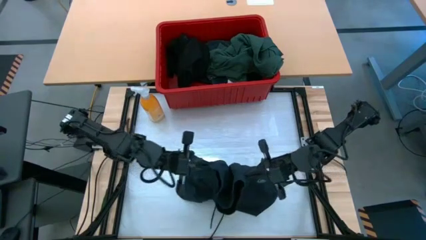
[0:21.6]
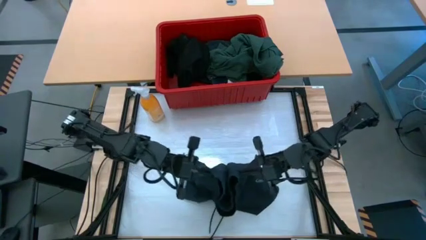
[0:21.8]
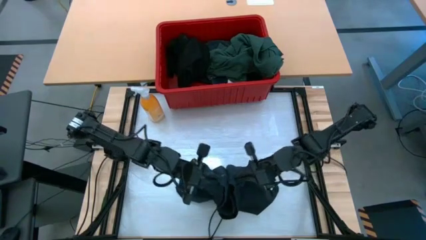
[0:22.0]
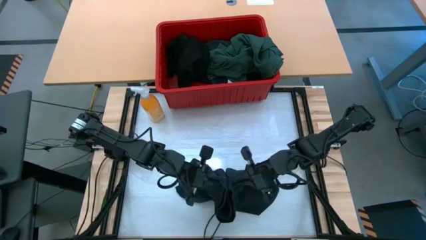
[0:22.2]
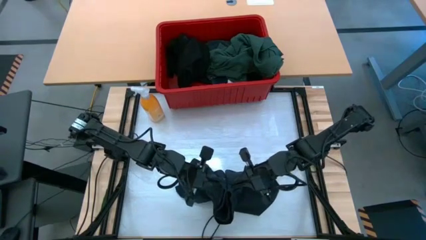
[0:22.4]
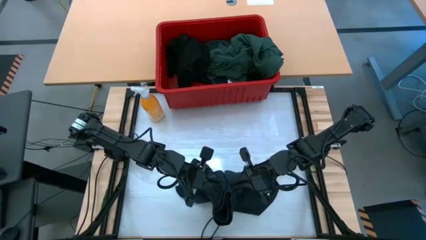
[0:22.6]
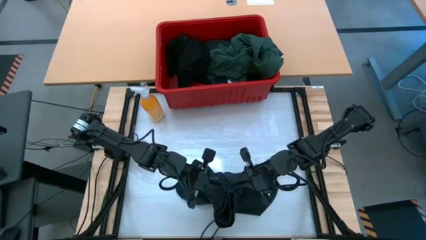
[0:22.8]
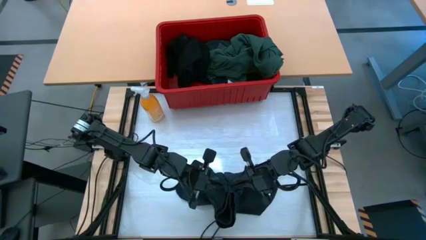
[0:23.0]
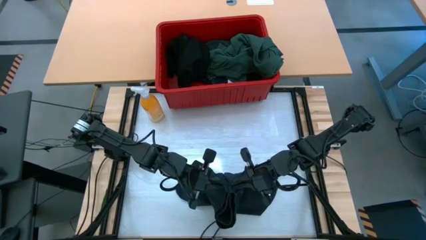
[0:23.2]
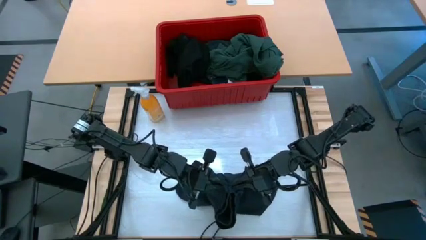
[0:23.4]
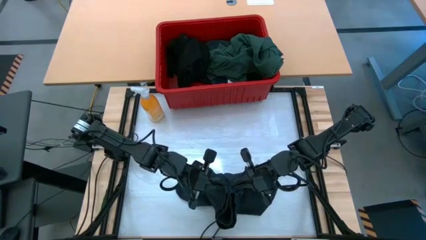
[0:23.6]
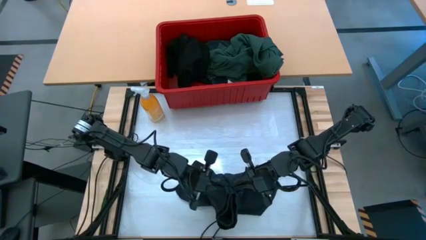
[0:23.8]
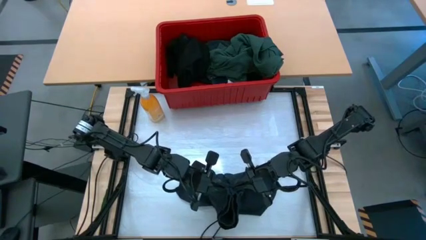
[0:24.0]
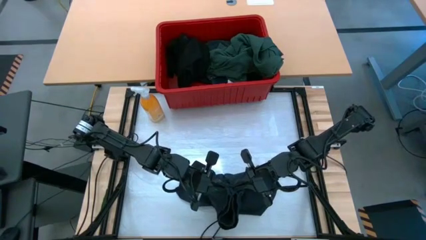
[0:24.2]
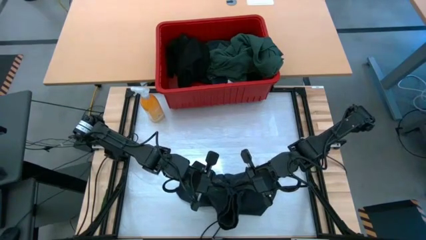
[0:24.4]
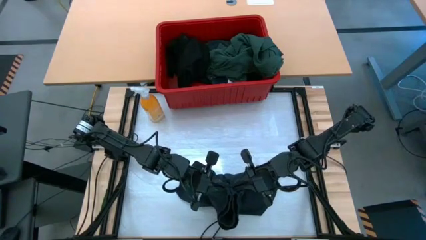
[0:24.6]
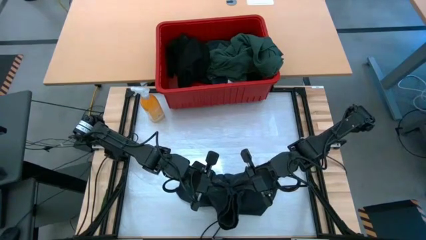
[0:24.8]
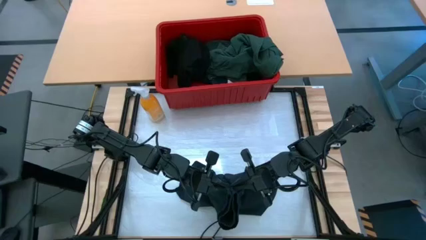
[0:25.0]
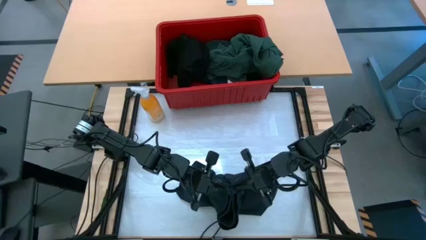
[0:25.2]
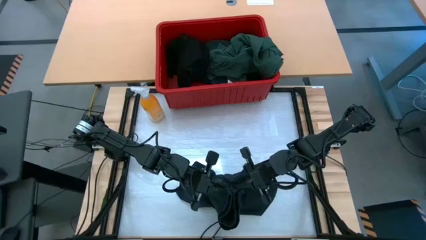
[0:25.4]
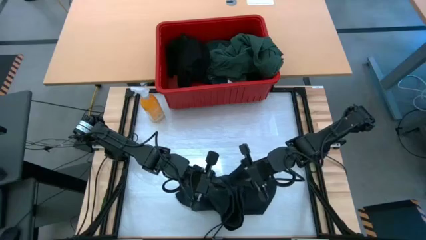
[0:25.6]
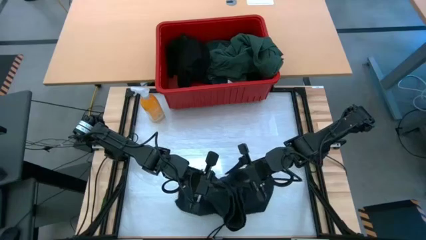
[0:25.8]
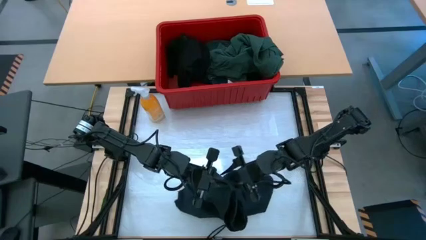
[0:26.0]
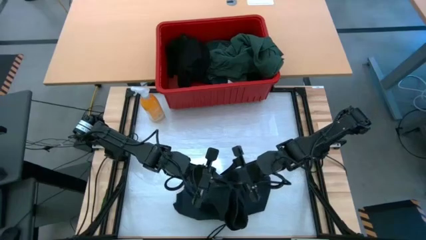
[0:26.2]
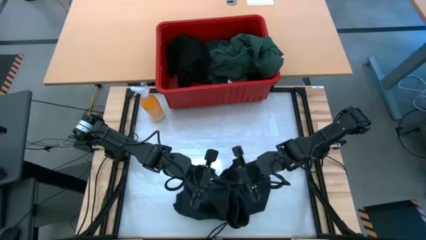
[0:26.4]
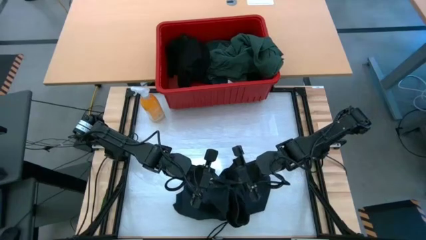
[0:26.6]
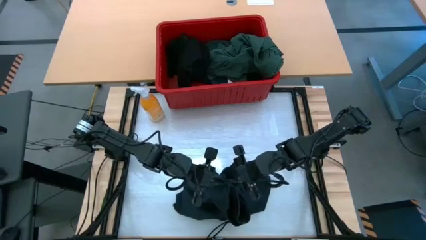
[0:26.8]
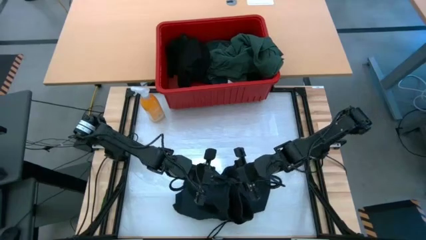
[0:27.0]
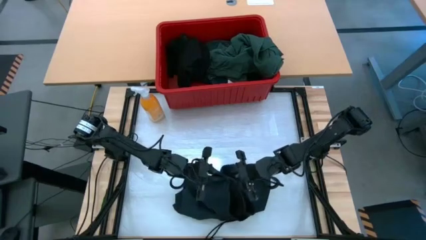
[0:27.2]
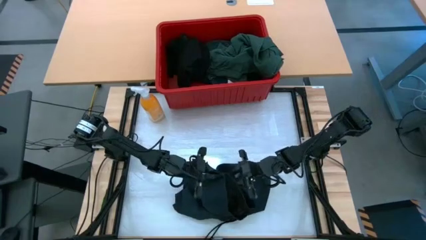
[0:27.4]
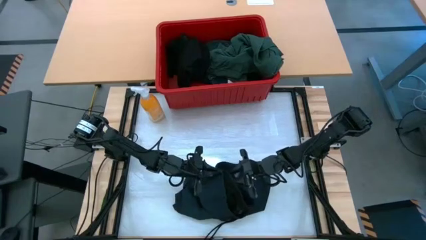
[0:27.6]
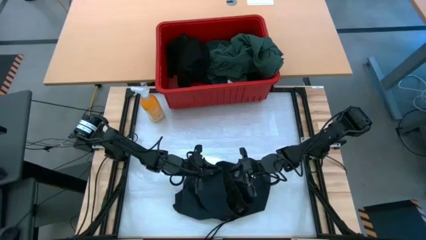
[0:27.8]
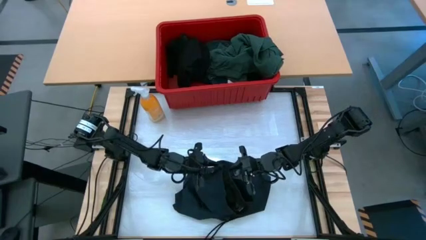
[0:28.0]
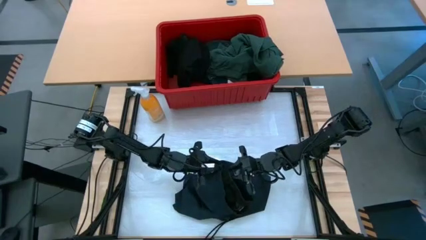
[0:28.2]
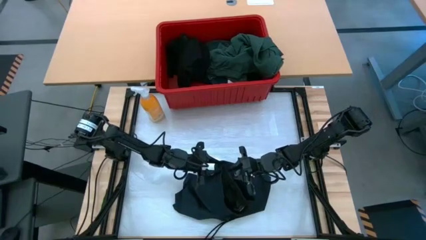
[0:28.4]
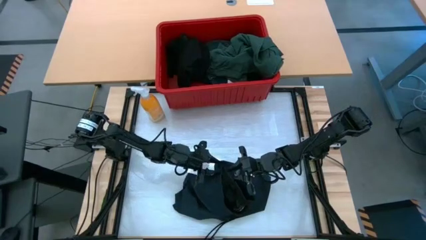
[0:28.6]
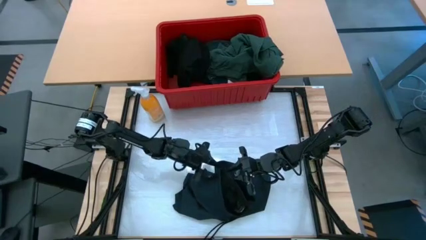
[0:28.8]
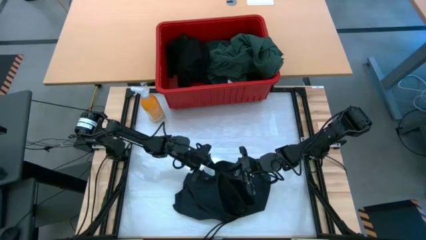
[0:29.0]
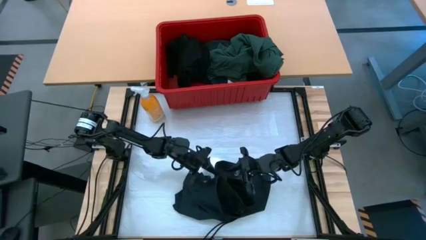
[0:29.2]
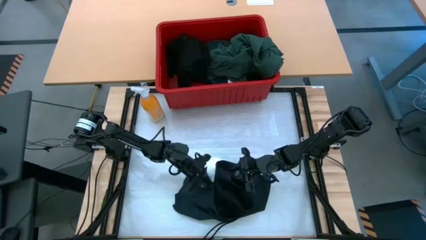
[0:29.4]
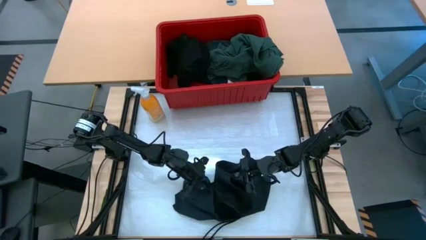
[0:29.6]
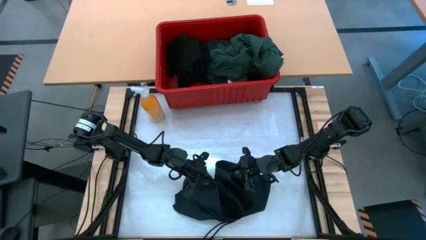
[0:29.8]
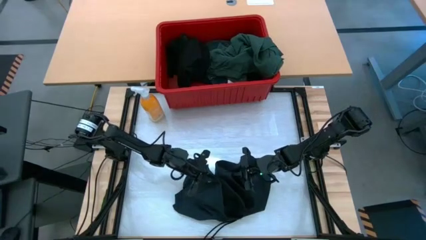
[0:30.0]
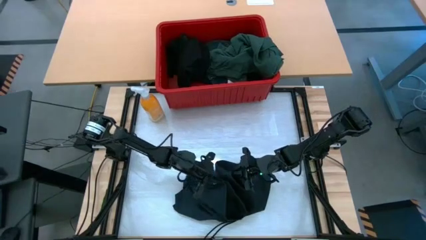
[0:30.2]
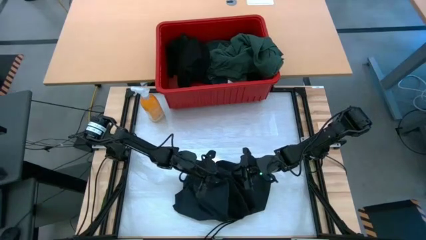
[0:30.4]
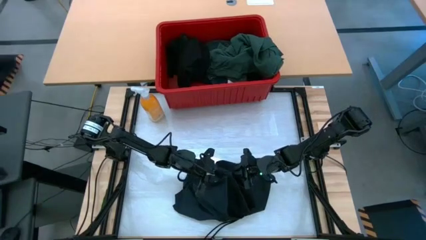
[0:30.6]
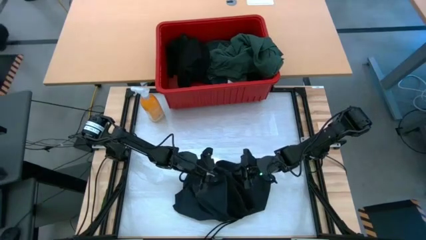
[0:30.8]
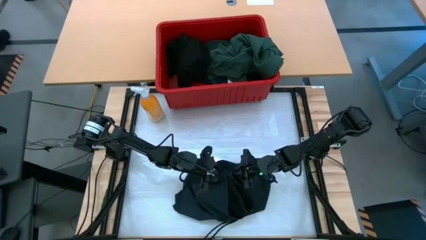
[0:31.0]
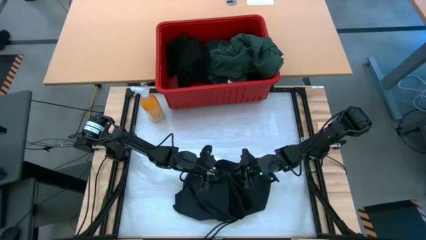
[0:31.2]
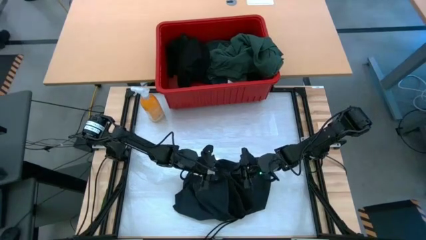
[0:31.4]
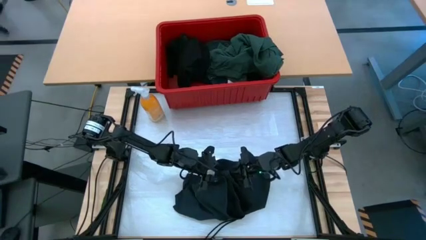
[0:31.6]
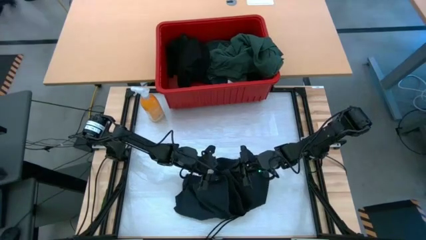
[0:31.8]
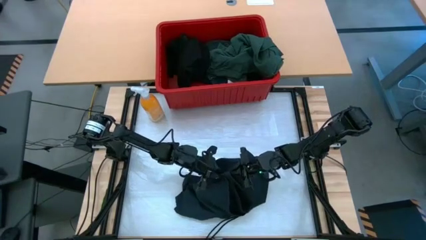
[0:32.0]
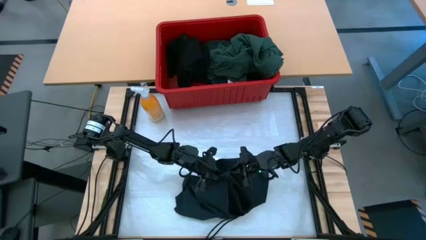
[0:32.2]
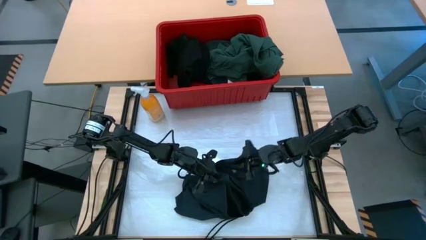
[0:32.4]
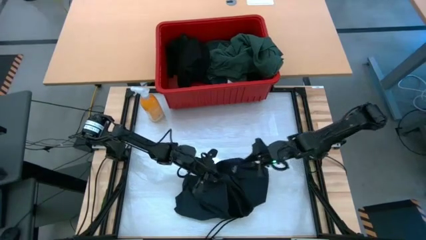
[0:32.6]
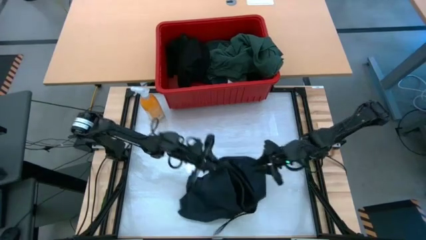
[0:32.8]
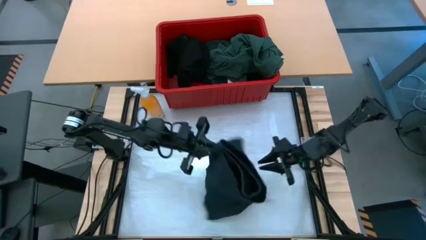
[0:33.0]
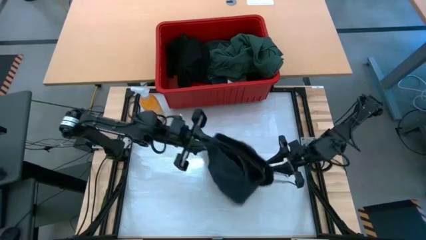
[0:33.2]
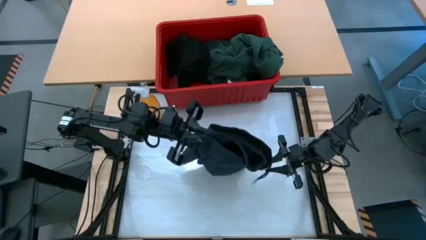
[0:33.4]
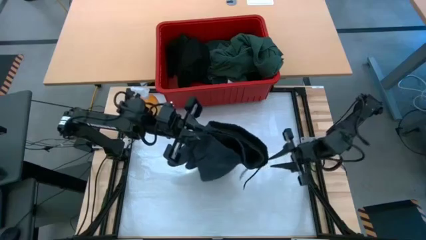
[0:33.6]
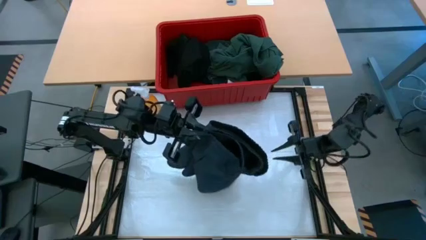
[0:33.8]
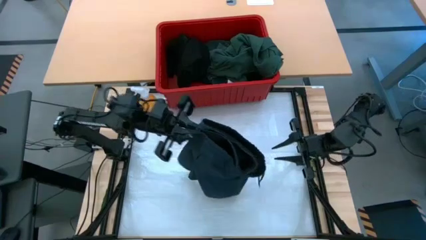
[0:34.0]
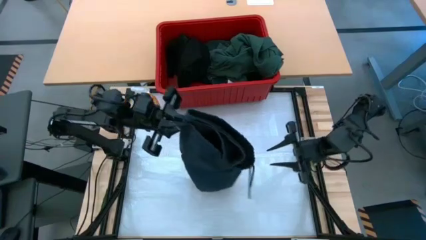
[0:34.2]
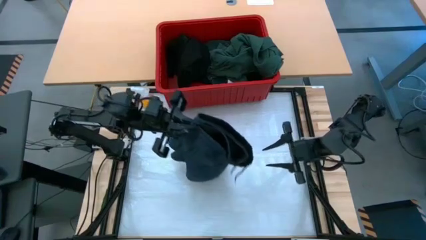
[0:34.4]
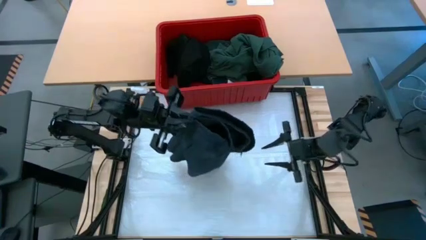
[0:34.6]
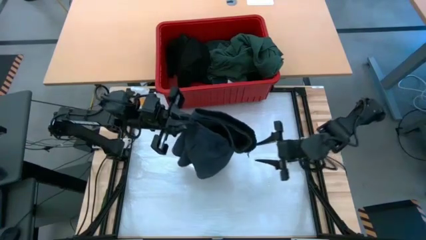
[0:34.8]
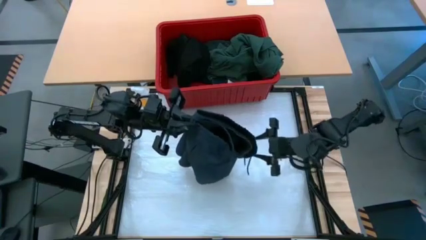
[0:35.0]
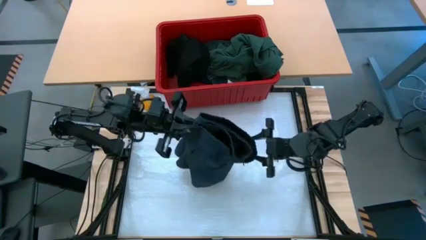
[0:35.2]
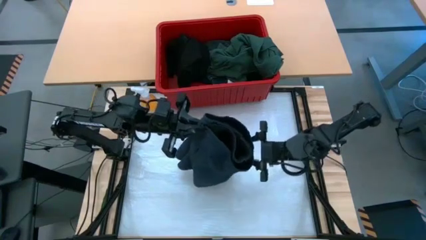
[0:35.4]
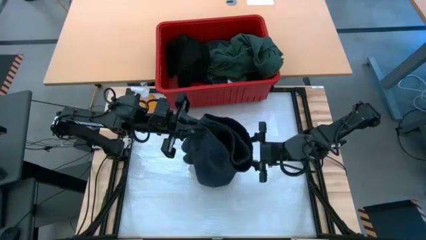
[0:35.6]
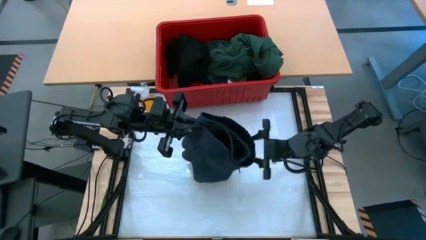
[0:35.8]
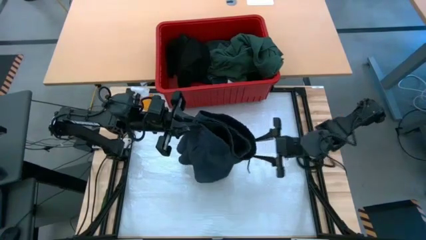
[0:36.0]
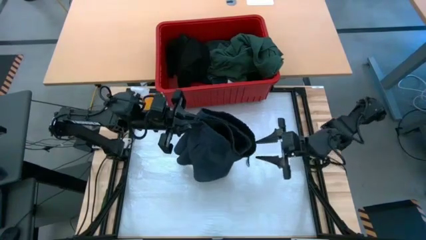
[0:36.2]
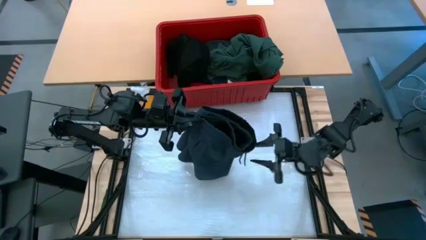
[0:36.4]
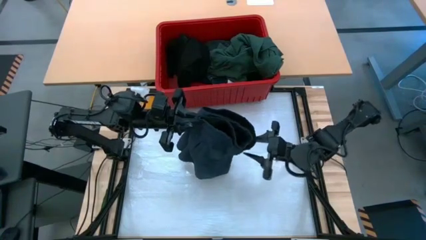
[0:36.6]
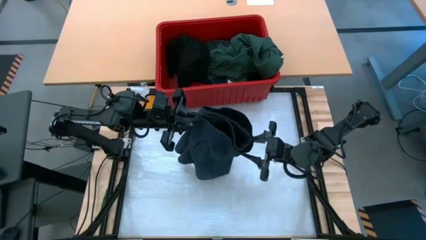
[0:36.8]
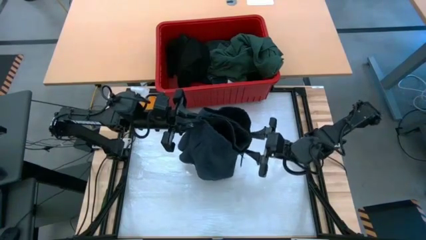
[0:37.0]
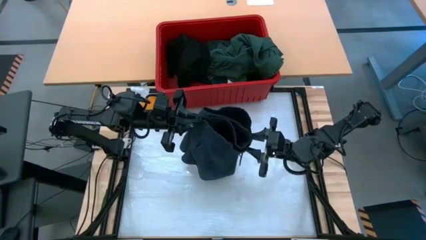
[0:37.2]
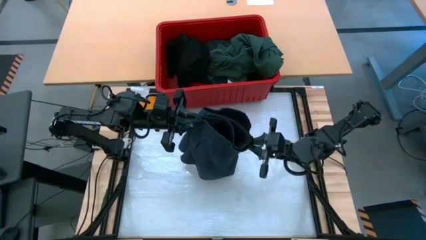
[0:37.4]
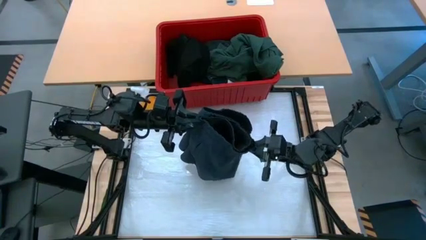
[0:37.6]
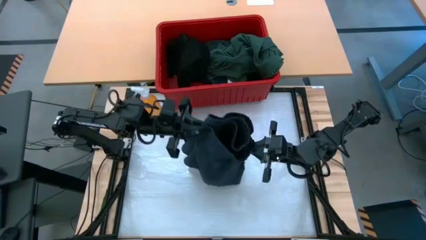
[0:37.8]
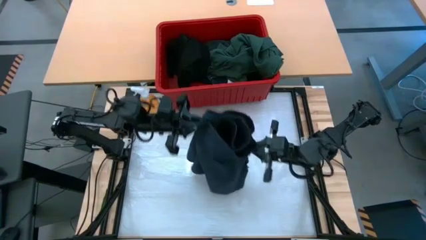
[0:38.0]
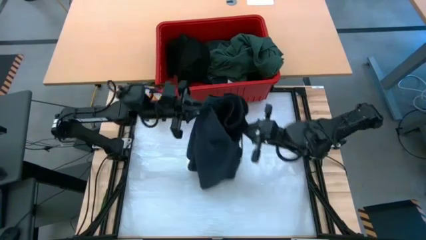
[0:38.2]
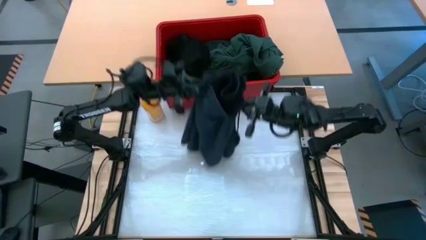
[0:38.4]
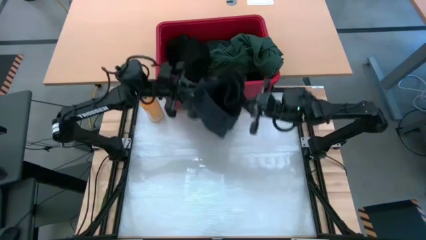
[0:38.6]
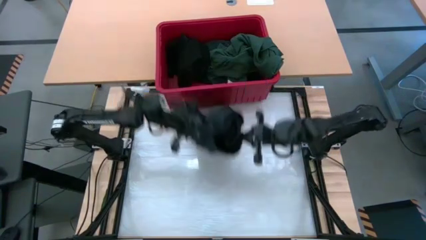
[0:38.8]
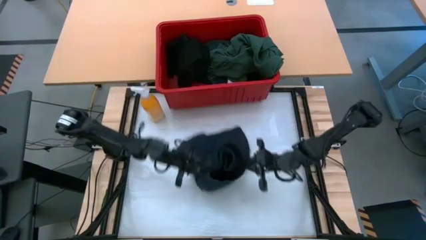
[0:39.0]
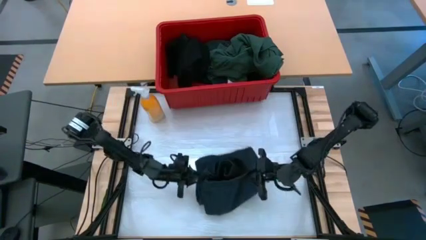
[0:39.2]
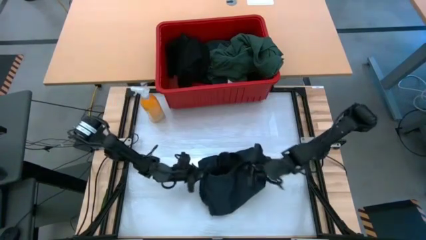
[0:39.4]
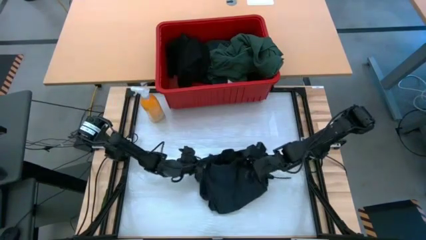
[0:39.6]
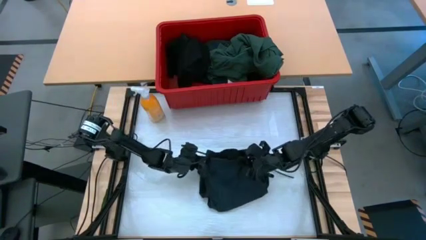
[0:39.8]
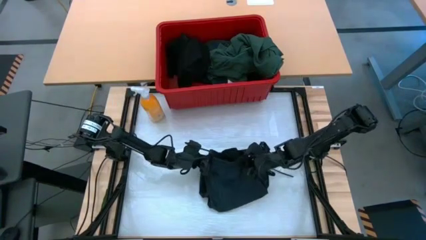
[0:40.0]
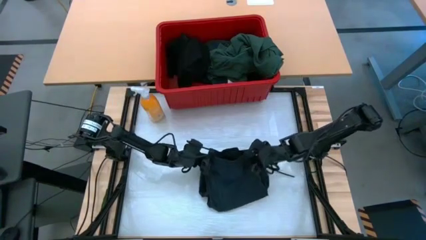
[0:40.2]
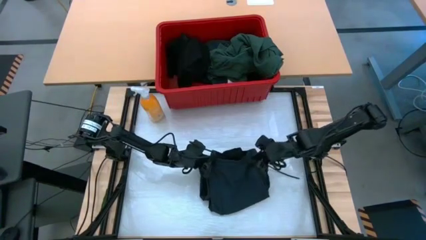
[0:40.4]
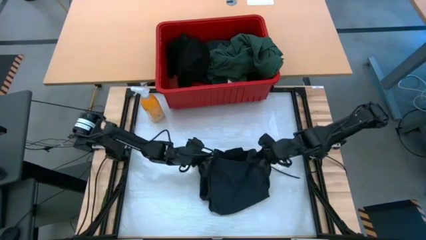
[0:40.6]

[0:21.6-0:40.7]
Task: Fold Laundry from Bin
Fold the black shorts from the red laundry bin
